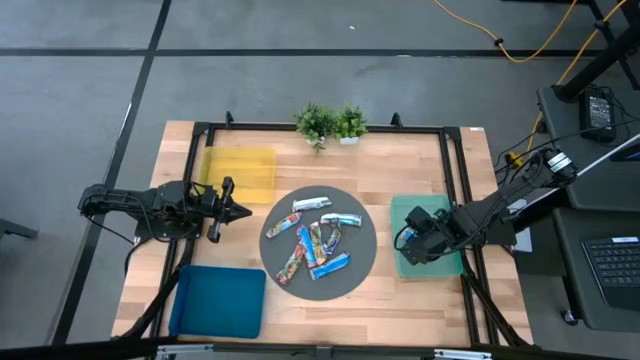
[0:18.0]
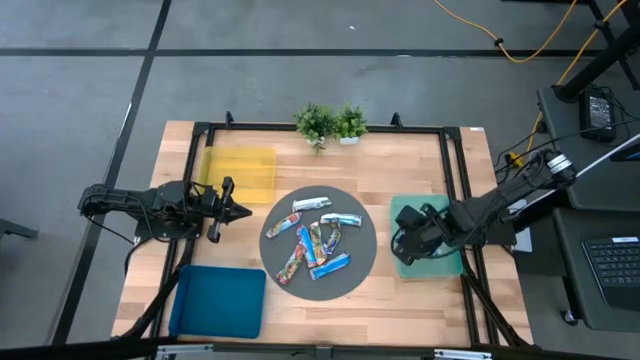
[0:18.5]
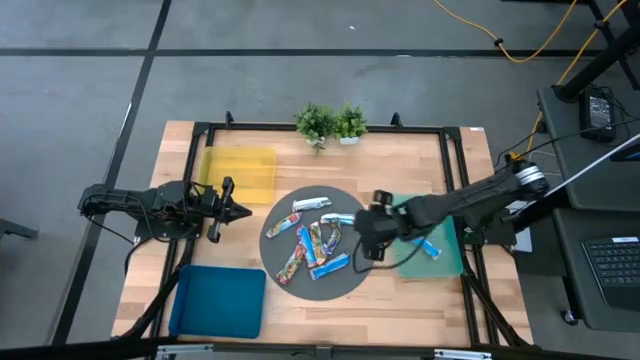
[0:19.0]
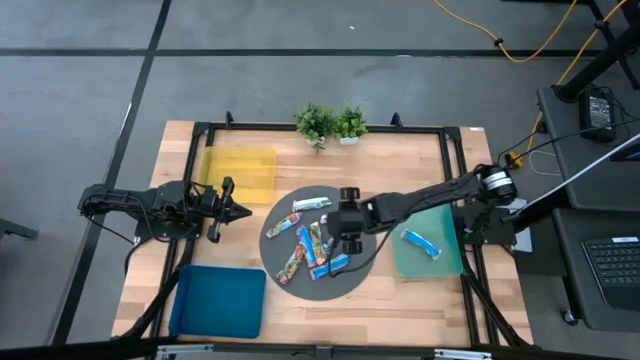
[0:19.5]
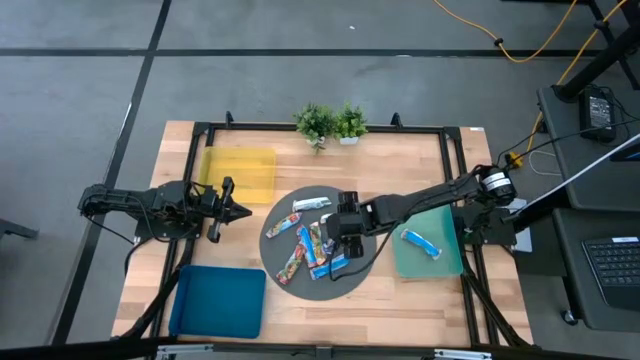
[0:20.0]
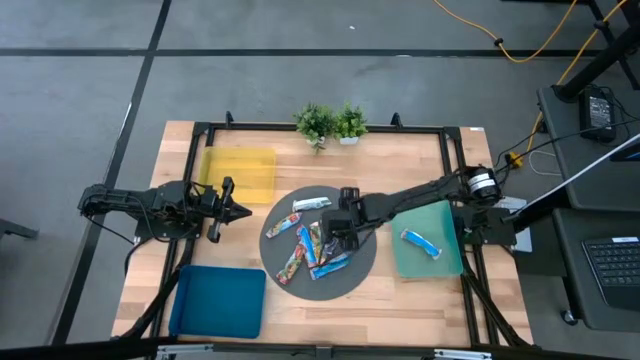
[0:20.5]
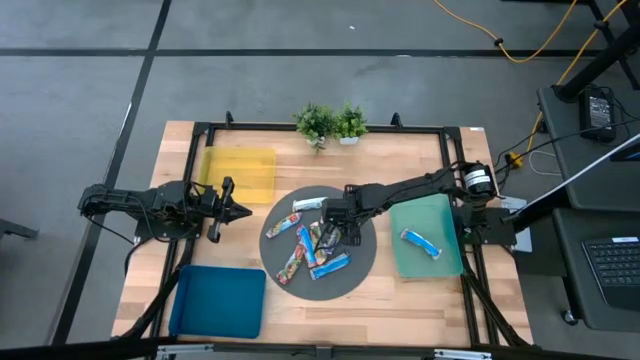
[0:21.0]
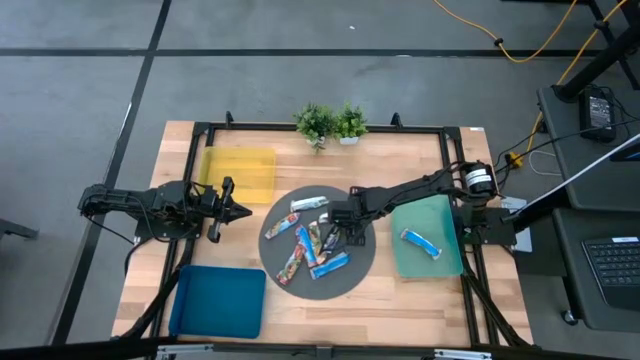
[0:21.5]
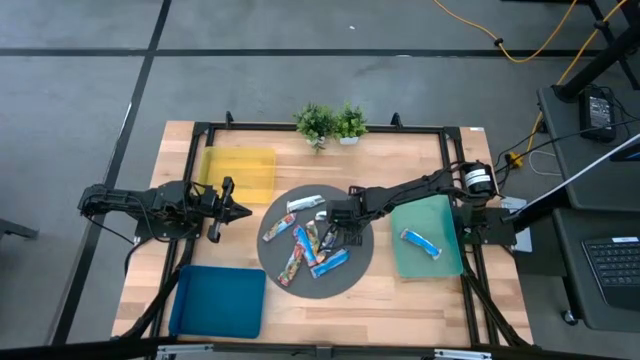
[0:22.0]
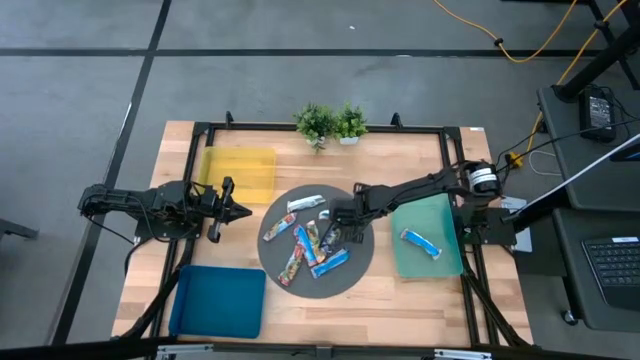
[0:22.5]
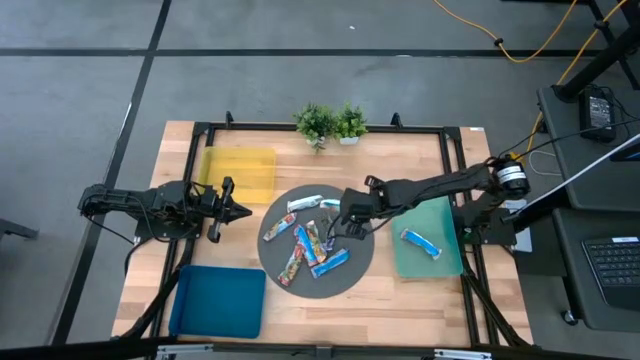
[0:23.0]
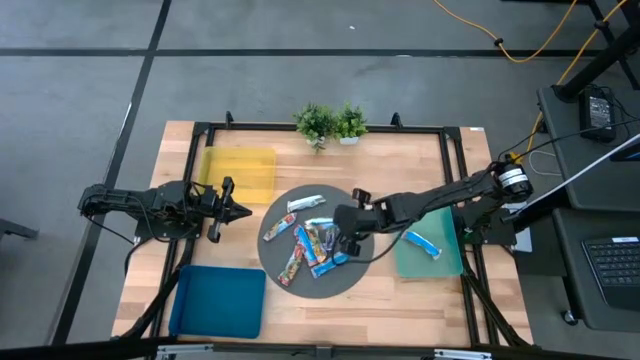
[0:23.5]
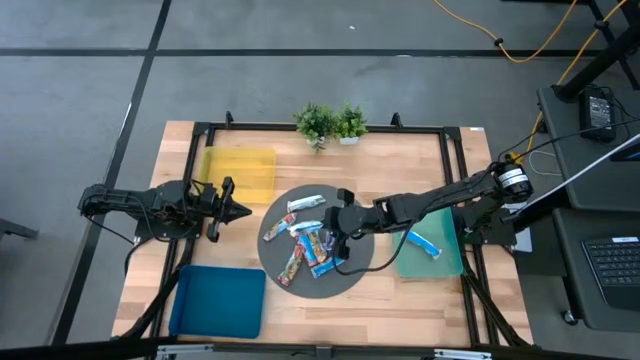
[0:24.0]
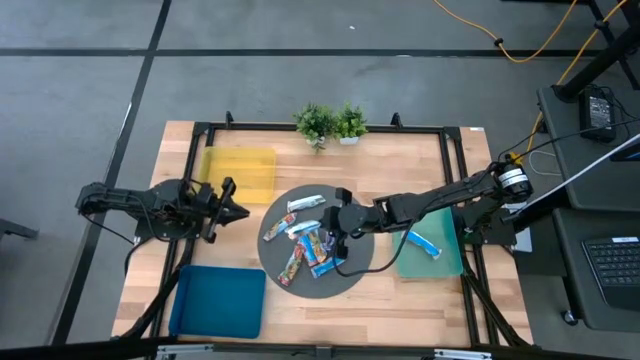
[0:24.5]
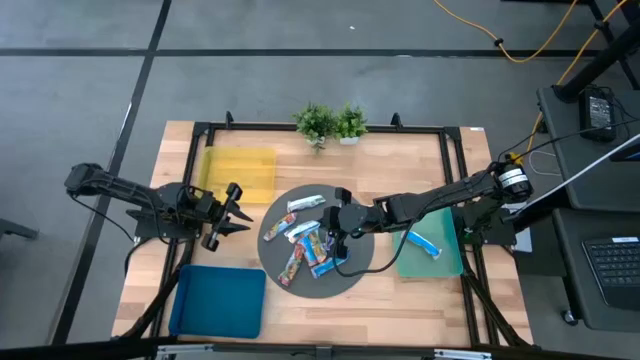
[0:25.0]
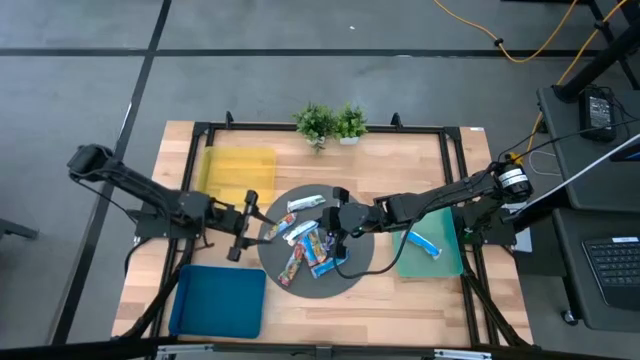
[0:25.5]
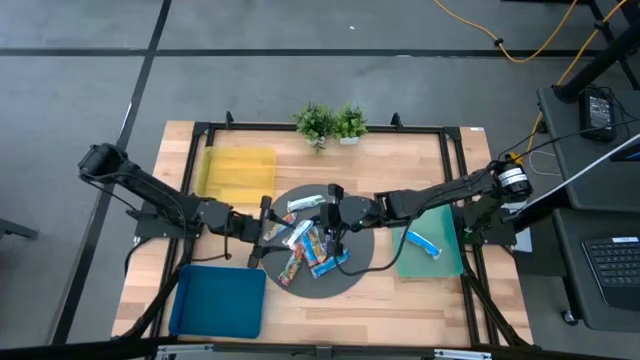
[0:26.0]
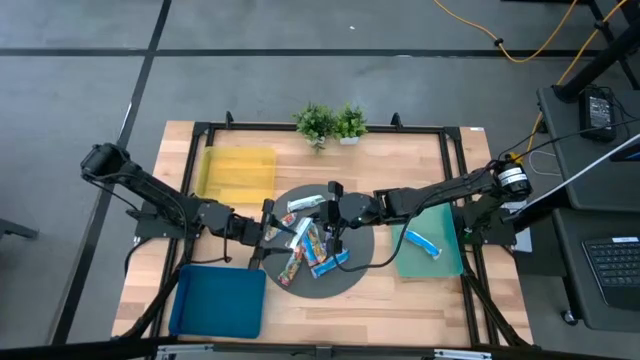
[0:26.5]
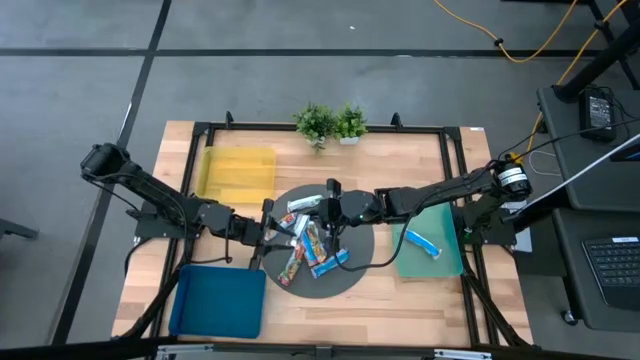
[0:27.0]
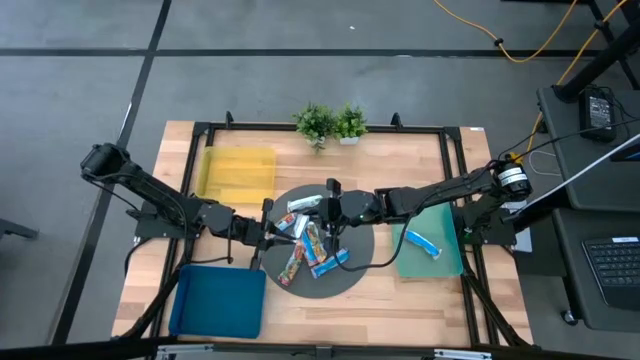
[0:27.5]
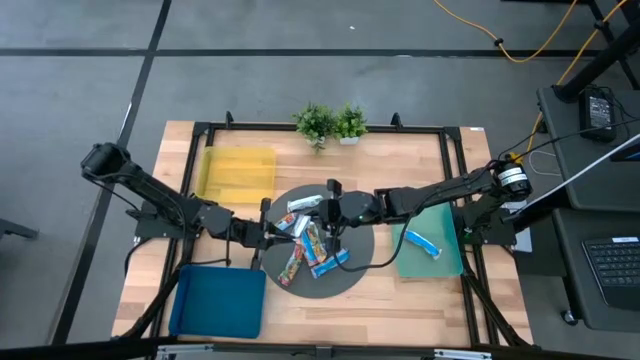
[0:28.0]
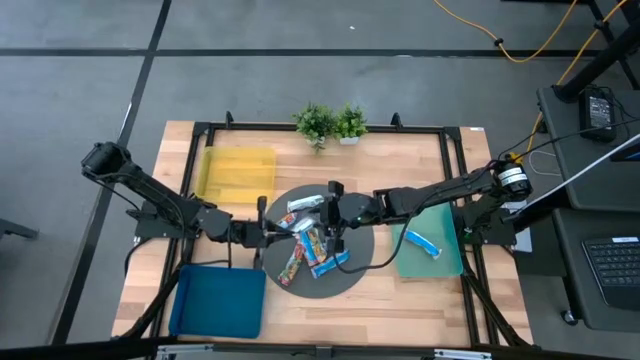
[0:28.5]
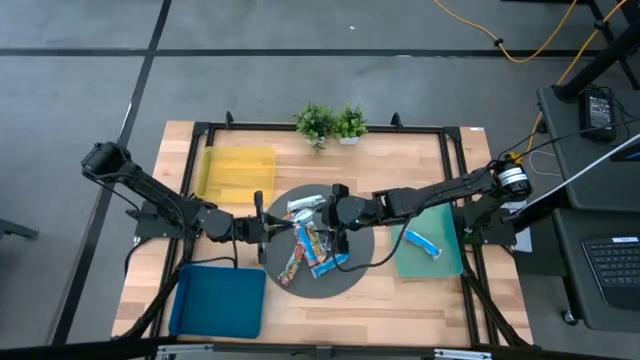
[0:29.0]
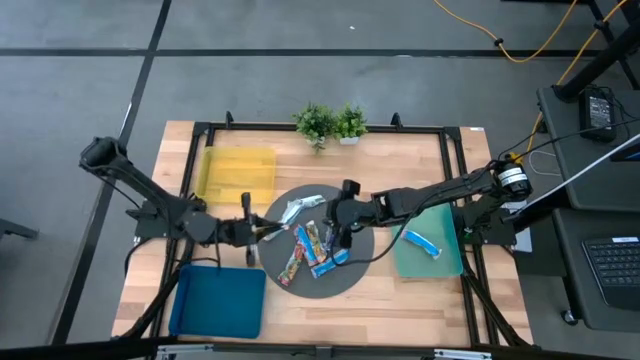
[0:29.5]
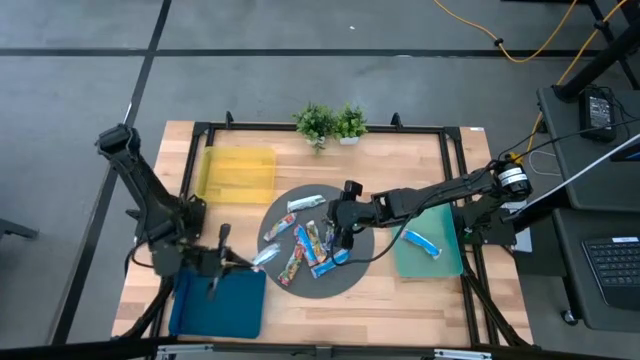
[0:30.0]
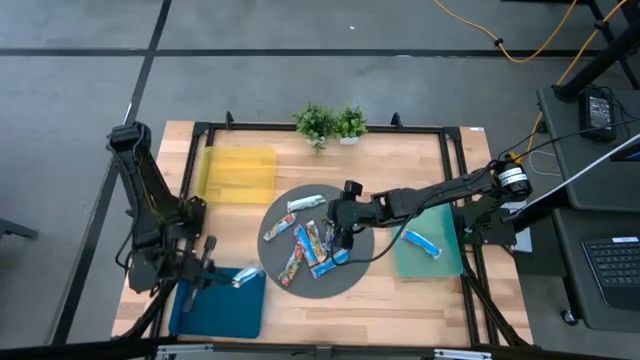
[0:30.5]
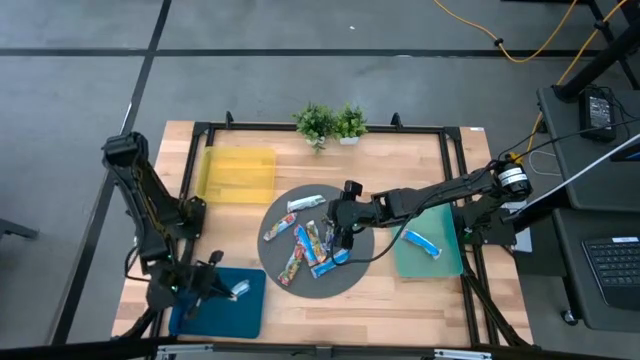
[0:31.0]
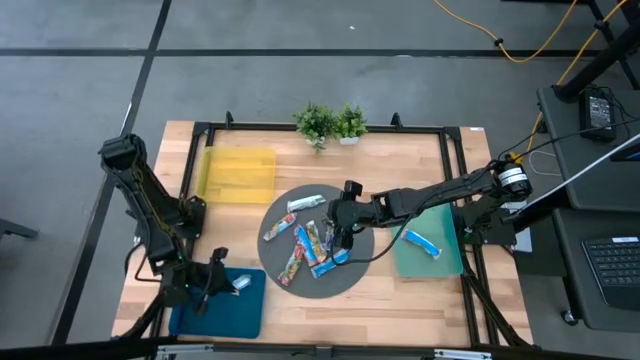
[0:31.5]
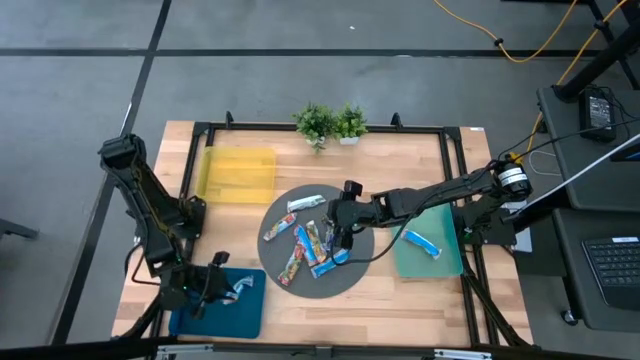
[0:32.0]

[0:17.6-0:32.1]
Task: Pick and place Granola Bars by type
Put the yellow granola bar into the blue bin

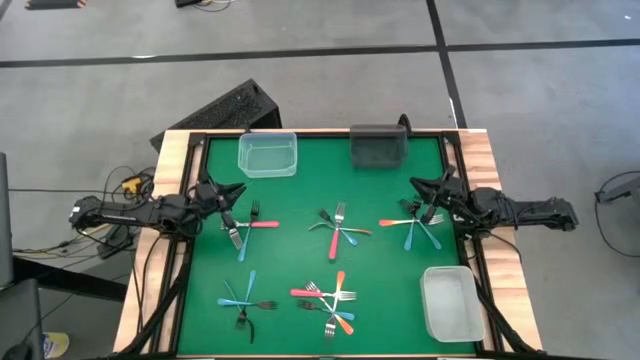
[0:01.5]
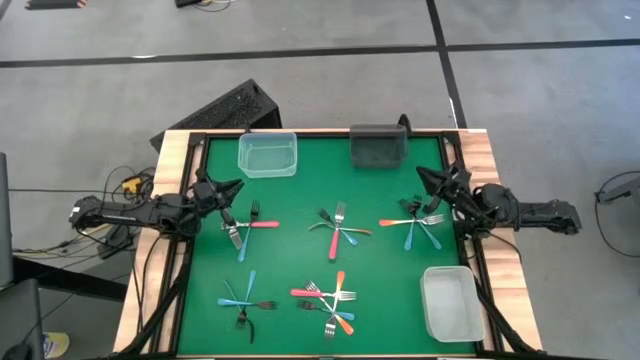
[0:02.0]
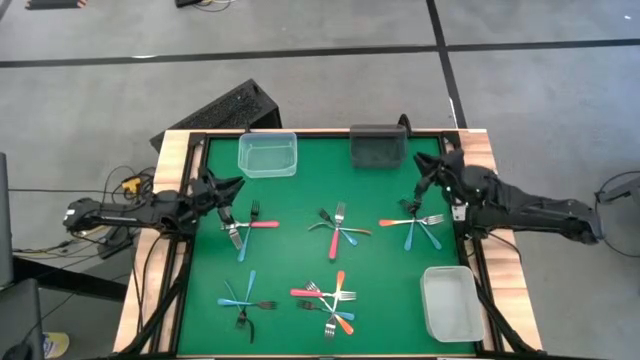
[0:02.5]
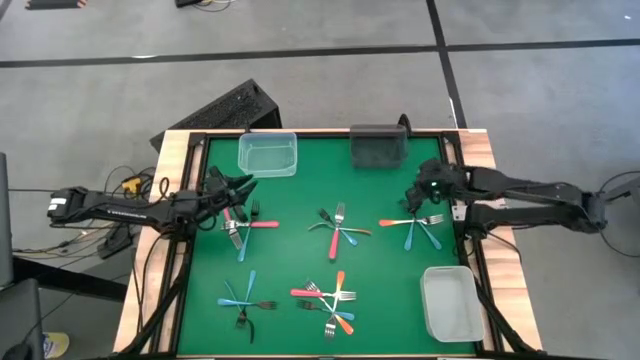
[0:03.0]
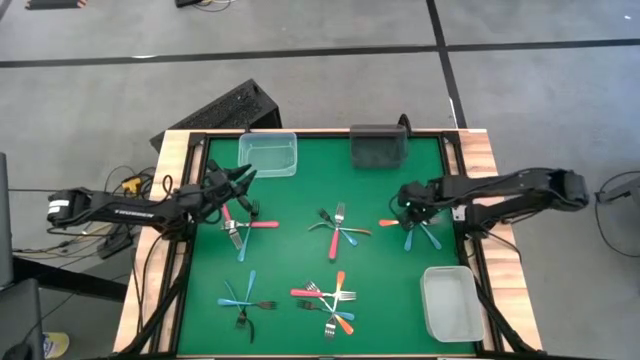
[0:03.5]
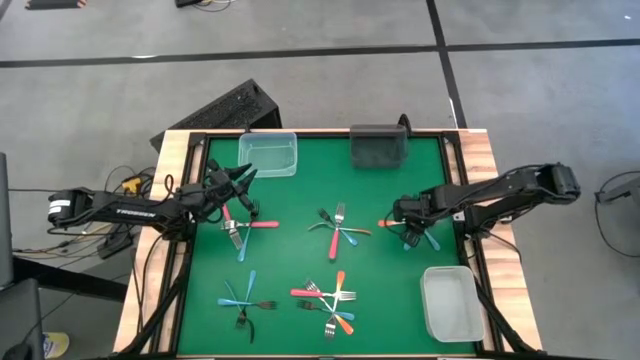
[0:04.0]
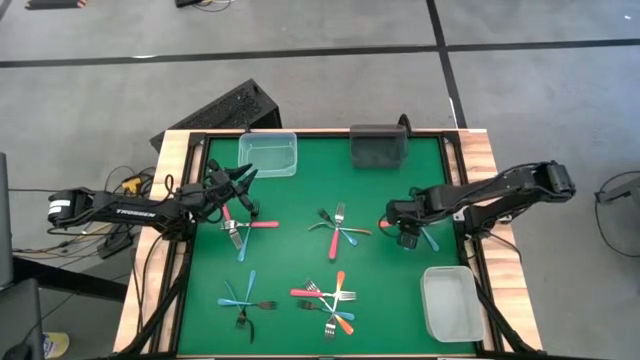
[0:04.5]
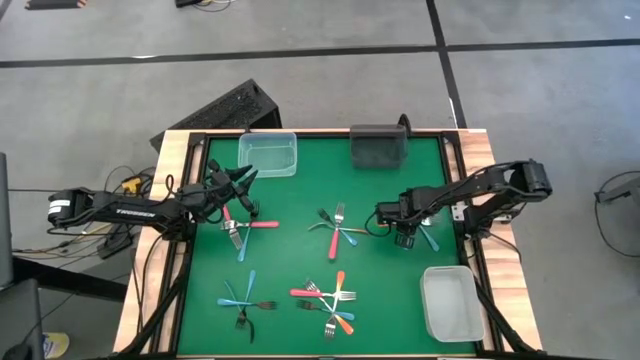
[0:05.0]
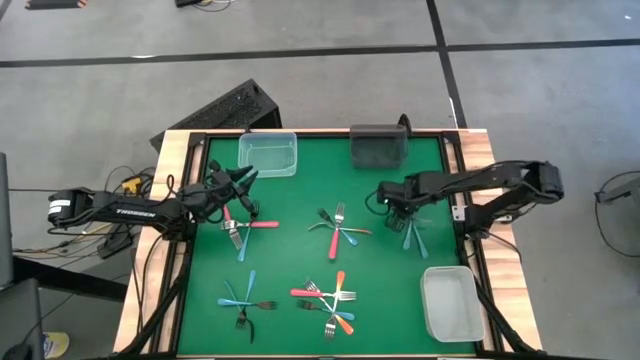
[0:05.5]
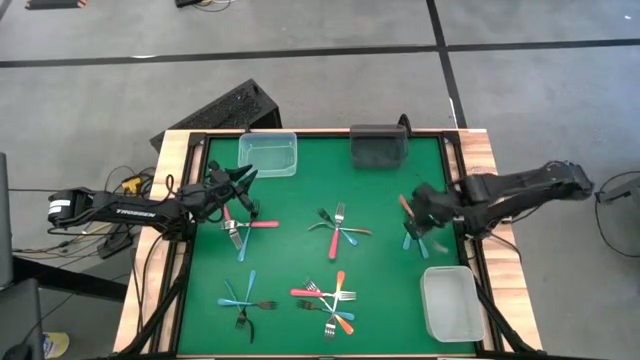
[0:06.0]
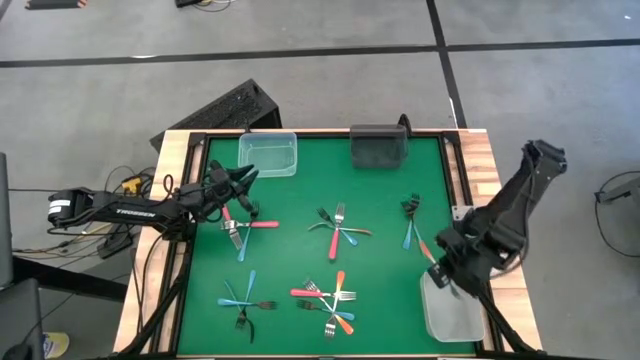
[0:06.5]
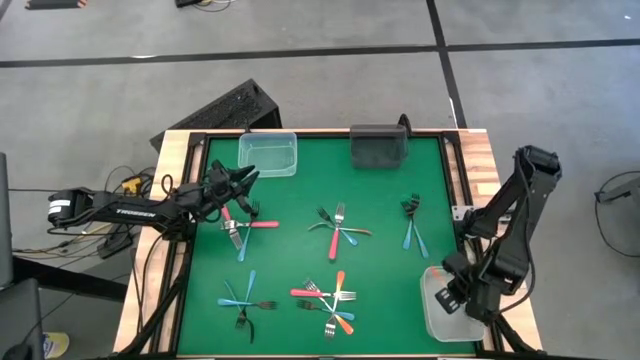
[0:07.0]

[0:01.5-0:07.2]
Task: Sort silverware by color (type)
Put the orange fork into the white bin

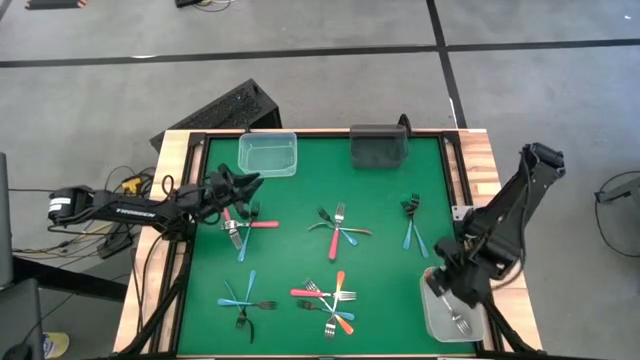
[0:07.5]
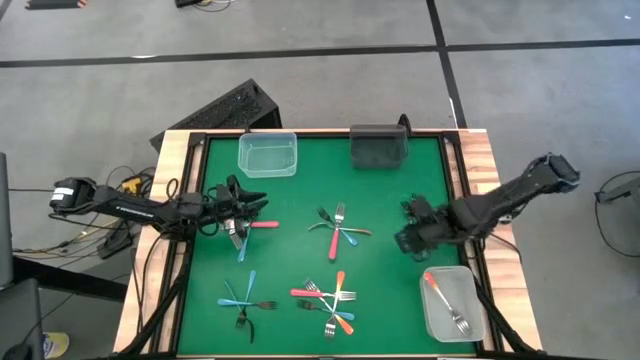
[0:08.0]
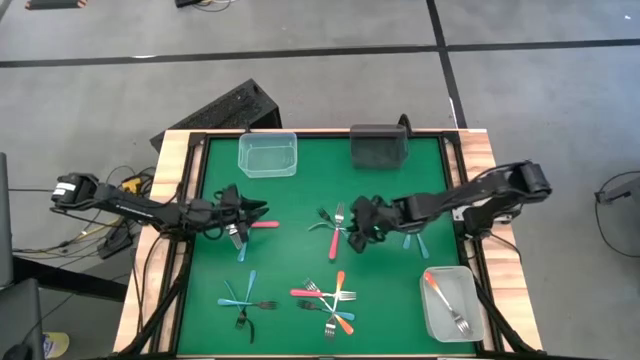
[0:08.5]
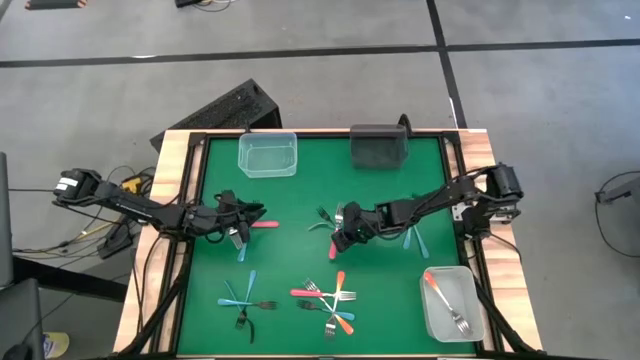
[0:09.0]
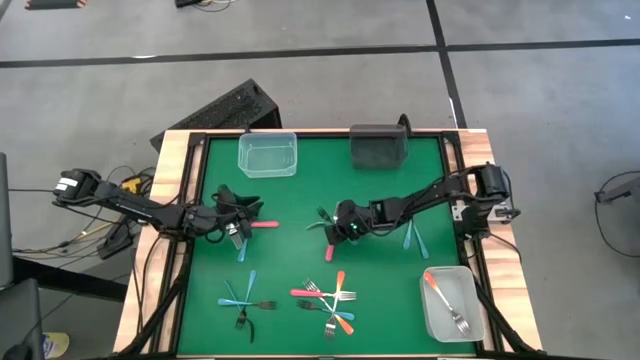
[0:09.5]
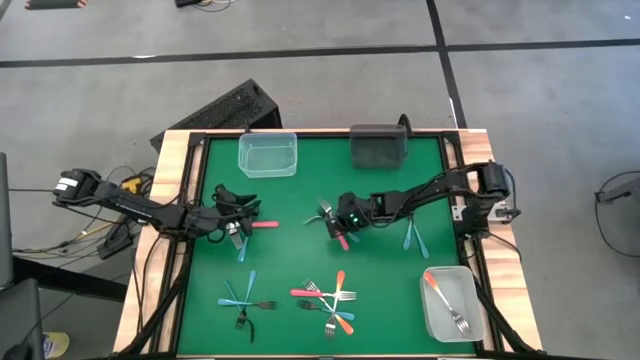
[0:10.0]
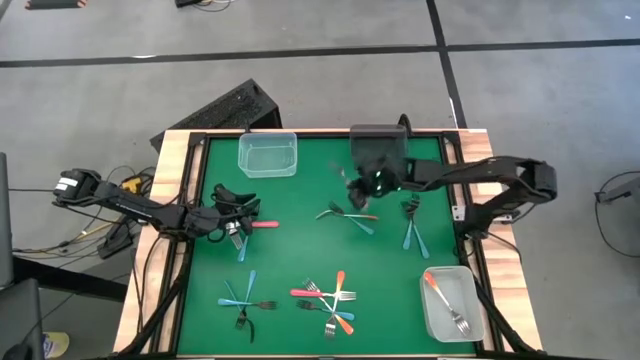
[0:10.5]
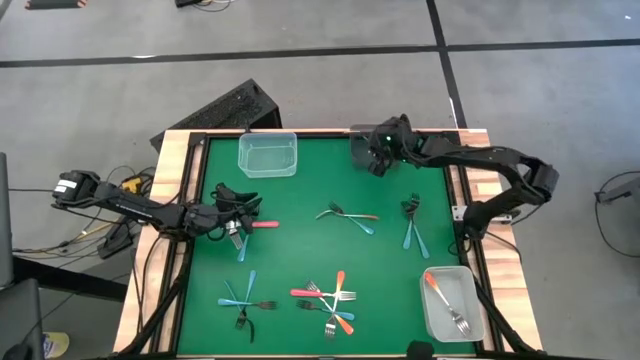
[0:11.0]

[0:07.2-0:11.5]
Put the pink fork into the black bin
